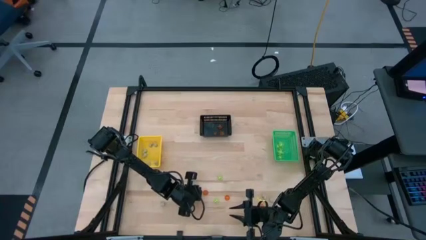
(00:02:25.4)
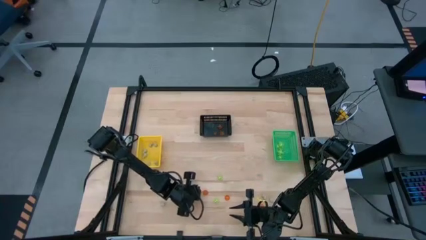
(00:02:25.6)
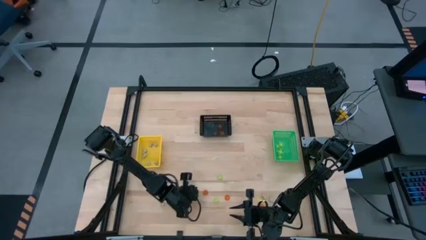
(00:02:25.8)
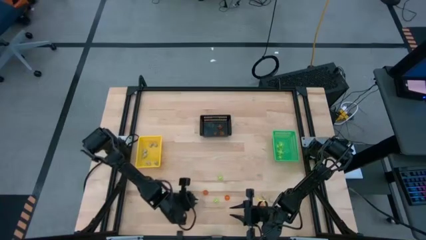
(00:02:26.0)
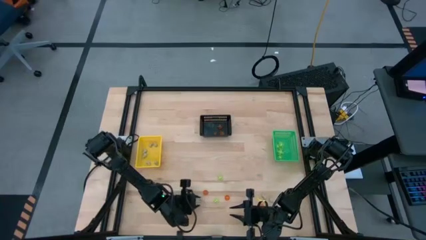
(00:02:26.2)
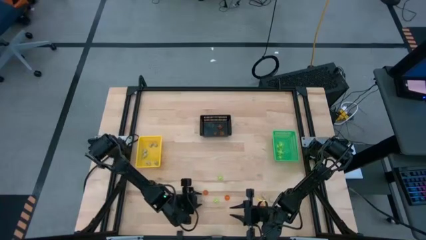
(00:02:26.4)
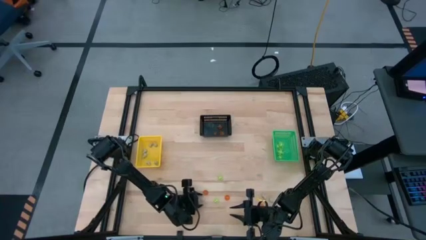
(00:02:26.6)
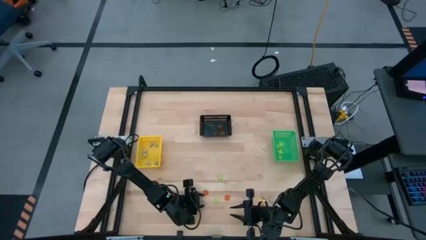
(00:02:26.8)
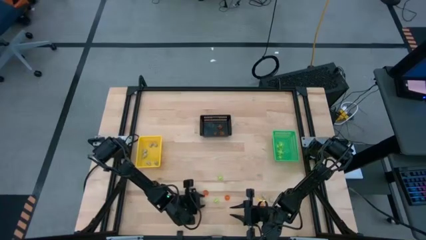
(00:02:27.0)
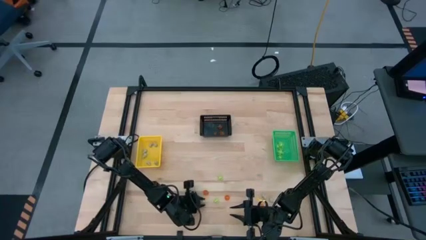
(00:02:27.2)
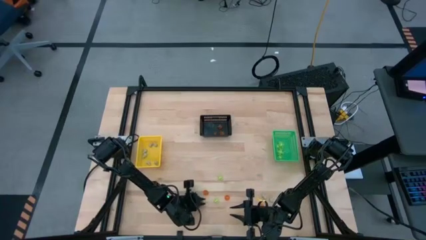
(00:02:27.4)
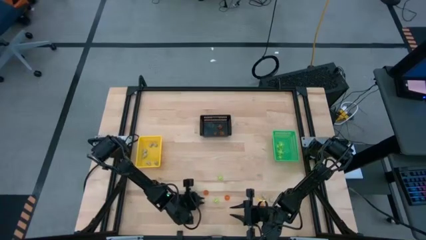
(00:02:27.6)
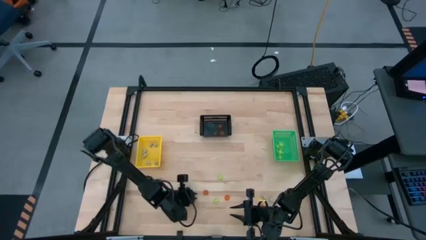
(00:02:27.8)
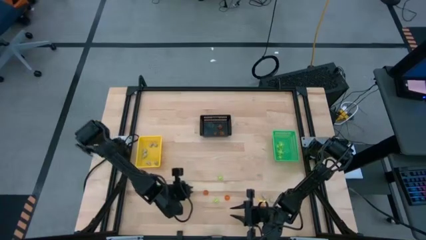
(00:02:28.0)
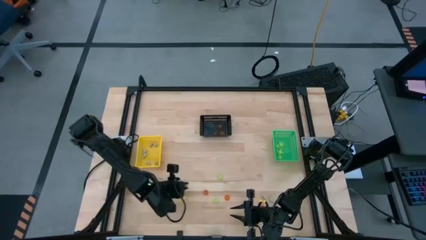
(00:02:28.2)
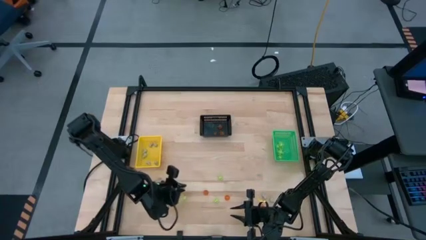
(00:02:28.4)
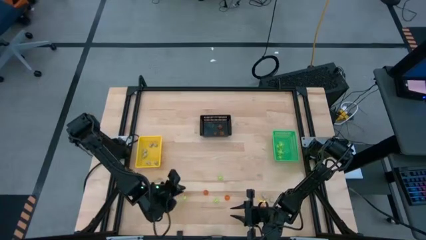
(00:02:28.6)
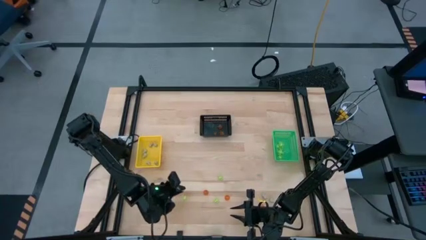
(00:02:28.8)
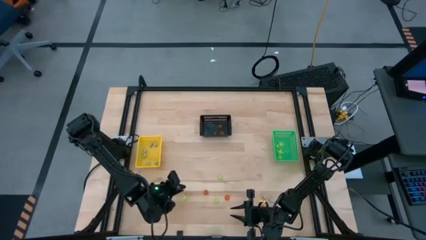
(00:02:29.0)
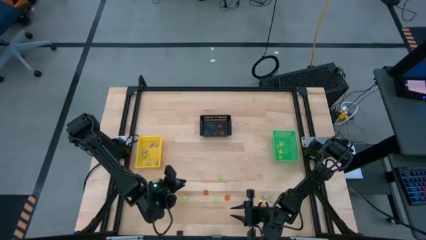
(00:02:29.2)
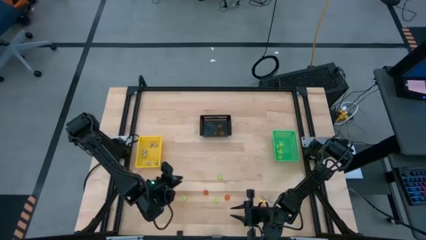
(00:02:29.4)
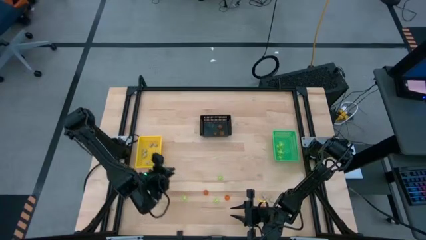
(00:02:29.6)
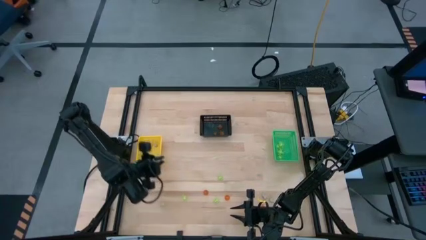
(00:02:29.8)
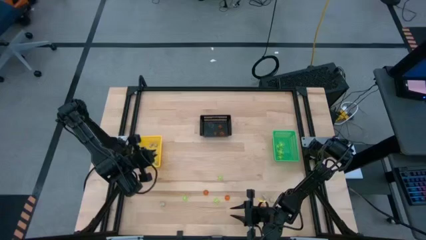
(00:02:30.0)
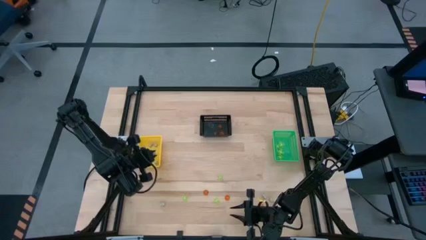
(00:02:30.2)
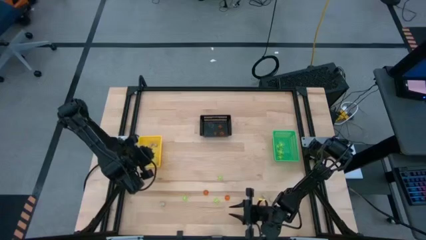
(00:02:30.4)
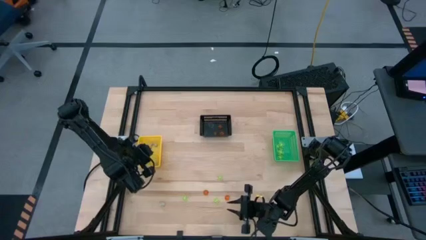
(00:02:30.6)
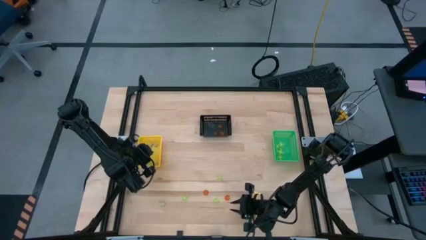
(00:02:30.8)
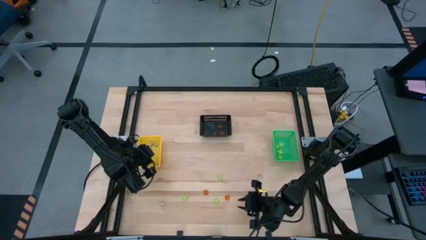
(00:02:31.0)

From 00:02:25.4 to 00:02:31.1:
Task: Sort Halloween decoration
Put the white skull toy into the yellow bin

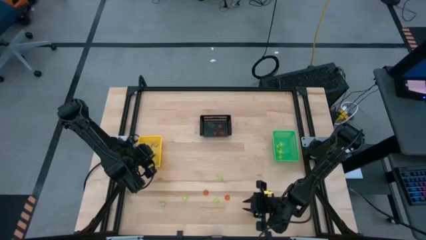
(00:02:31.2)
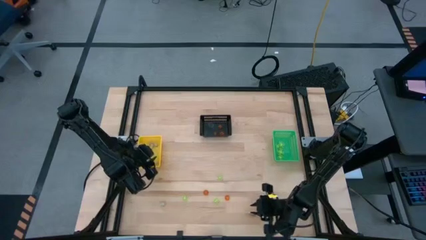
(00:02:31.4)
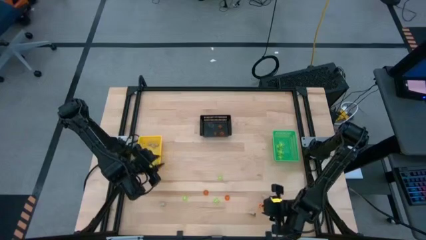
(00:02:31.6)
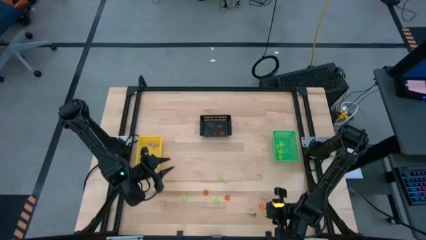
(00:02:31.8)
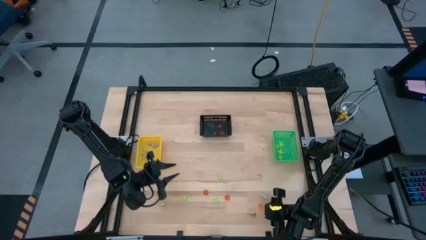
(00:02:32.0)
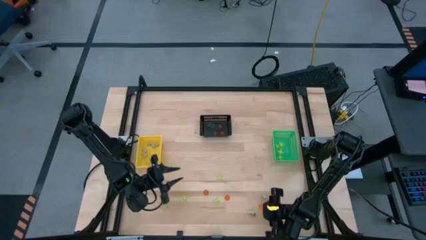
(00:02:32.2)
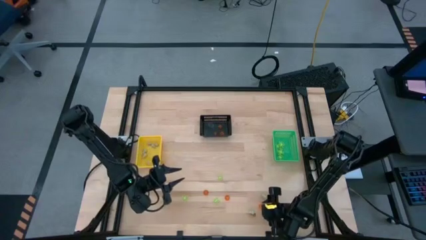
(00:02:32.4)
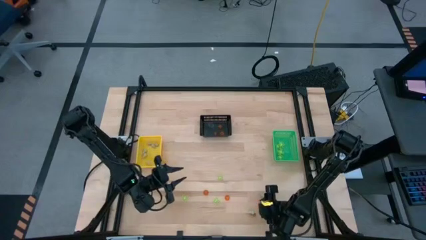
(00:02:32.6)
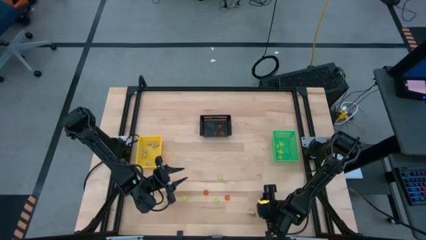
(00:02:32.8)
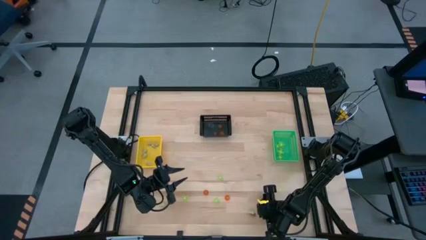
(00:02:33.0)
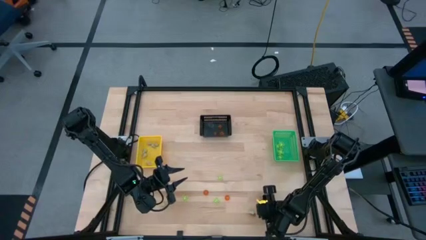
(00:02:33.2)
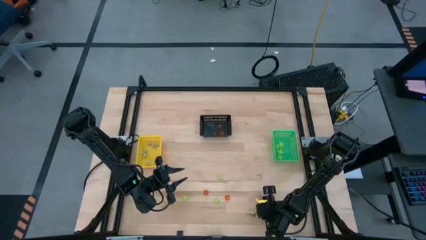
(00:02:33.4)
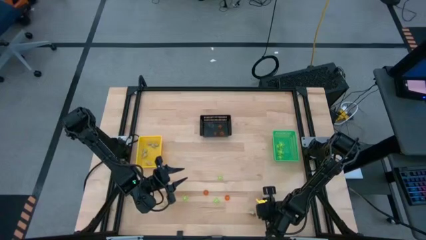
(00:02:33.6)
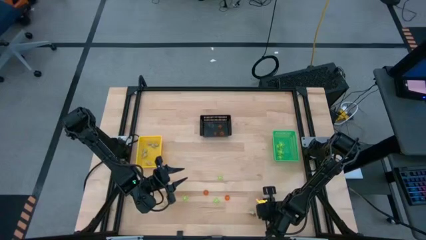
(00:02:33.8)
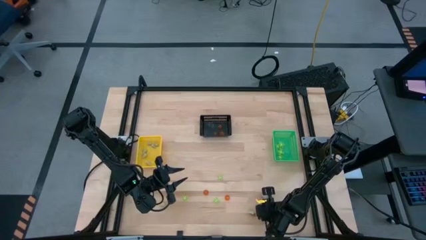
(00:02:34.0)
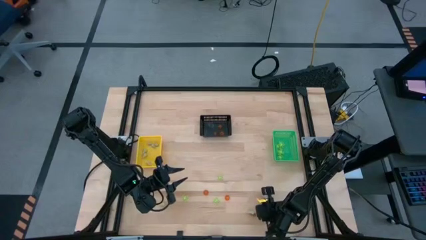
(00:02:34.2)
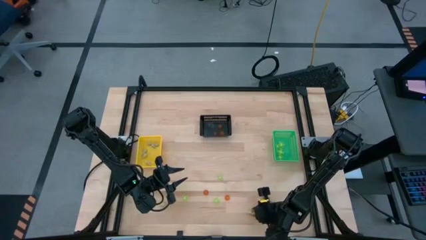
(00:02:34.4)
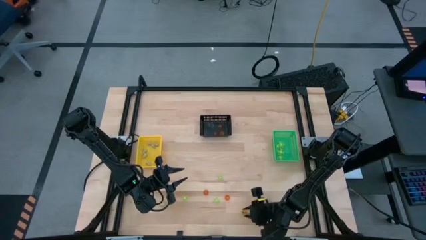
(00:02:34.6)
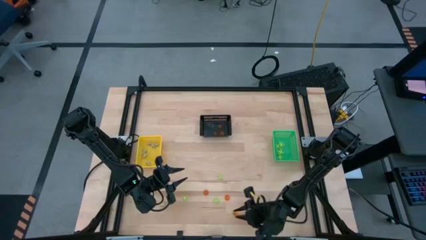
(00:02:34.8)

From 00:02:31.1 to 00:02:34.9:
Put the orange pumpkin toy into the black bin

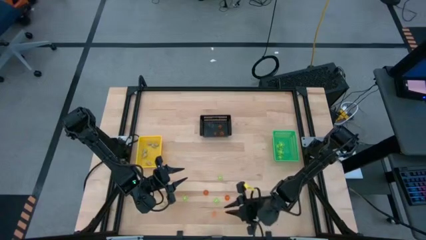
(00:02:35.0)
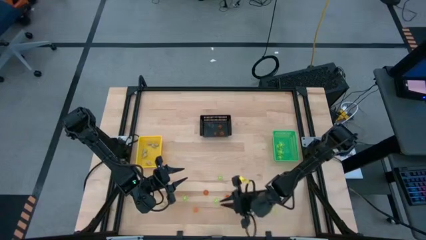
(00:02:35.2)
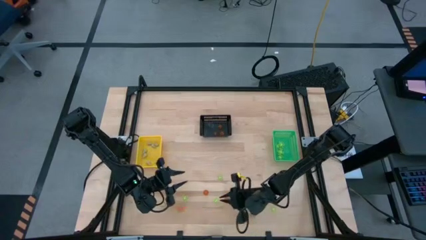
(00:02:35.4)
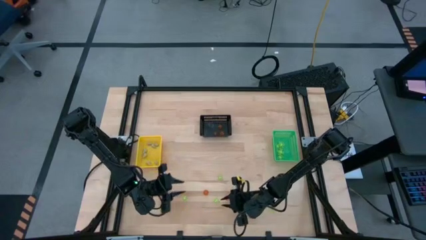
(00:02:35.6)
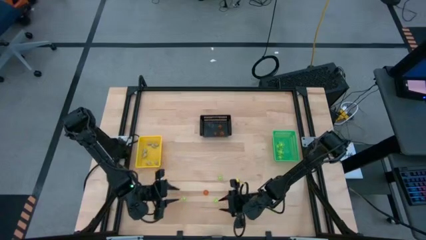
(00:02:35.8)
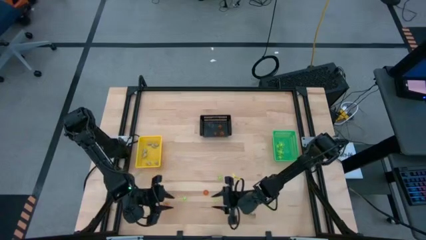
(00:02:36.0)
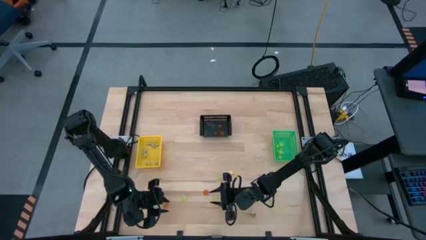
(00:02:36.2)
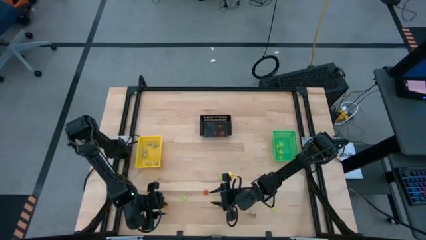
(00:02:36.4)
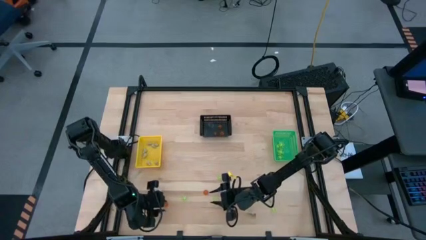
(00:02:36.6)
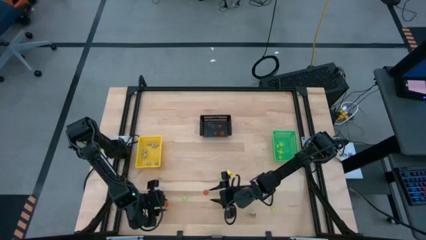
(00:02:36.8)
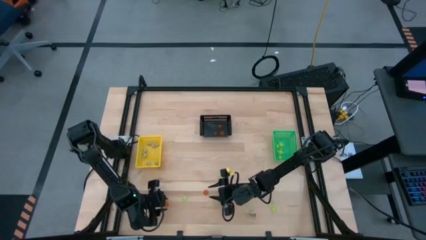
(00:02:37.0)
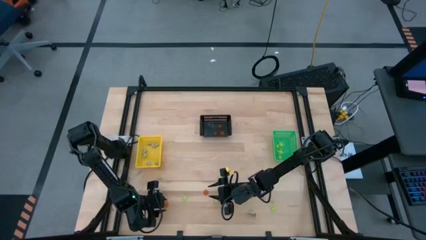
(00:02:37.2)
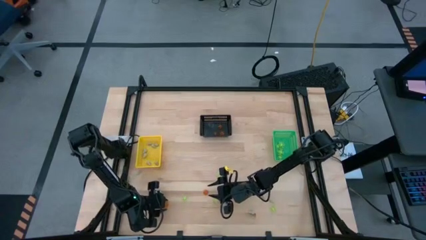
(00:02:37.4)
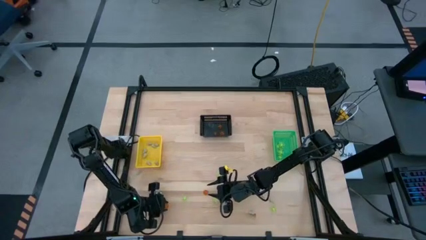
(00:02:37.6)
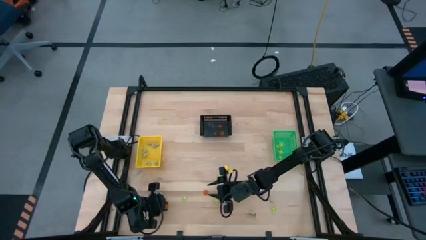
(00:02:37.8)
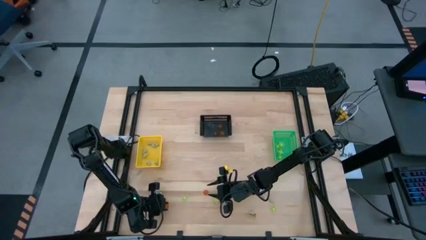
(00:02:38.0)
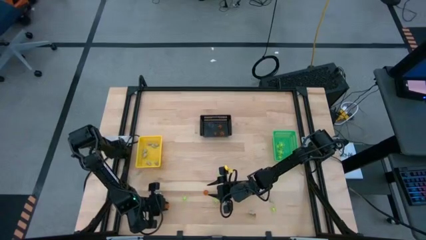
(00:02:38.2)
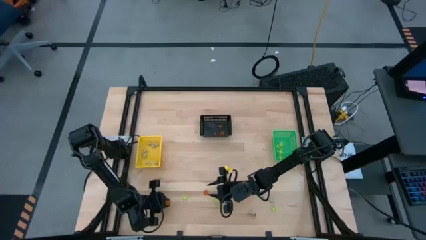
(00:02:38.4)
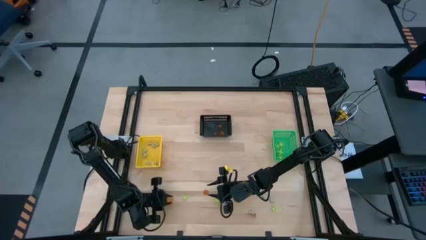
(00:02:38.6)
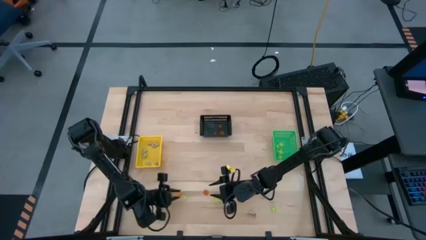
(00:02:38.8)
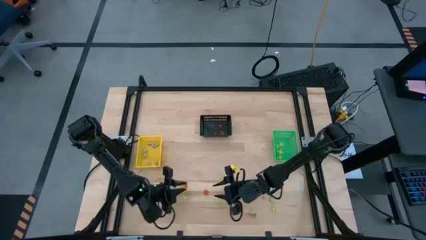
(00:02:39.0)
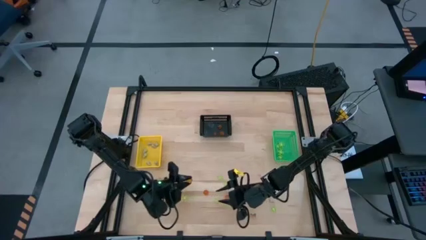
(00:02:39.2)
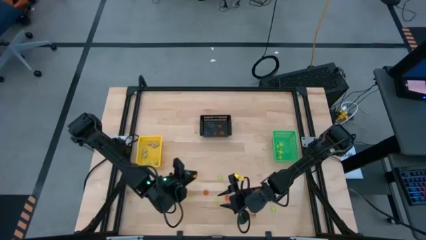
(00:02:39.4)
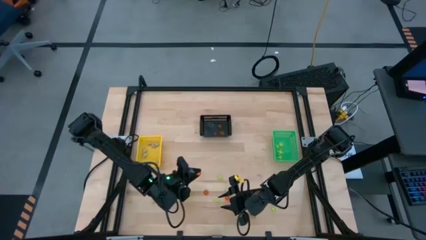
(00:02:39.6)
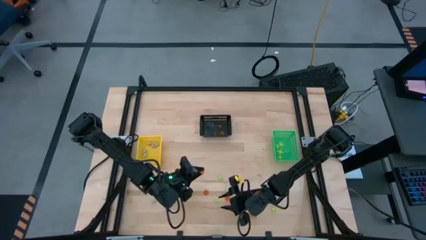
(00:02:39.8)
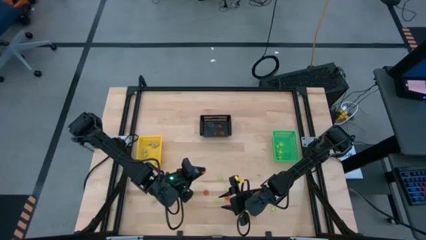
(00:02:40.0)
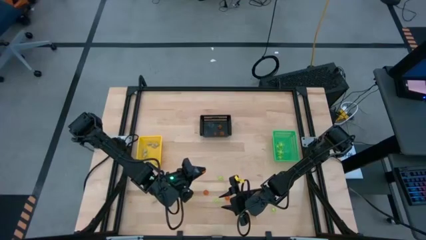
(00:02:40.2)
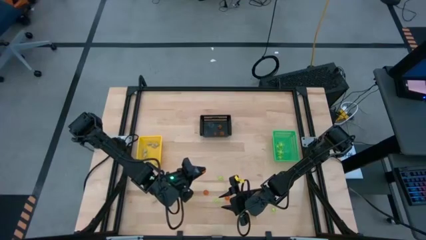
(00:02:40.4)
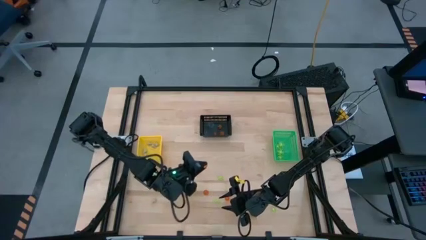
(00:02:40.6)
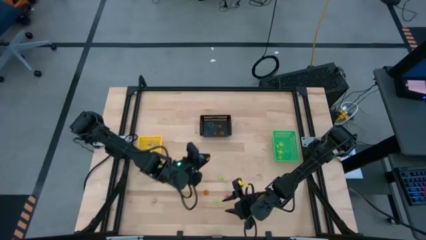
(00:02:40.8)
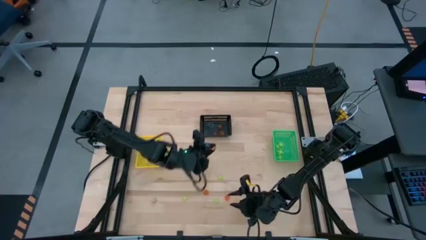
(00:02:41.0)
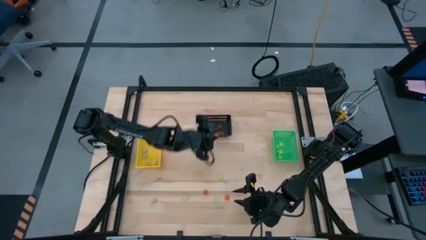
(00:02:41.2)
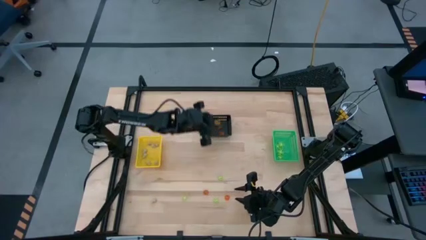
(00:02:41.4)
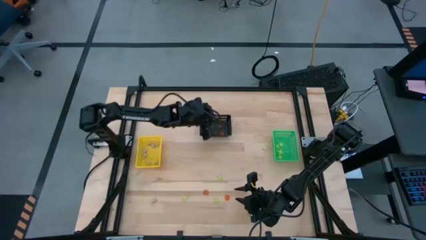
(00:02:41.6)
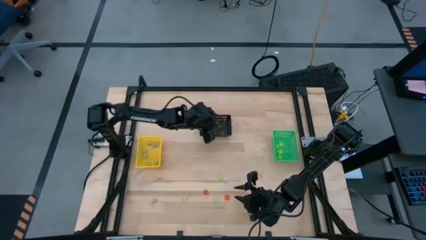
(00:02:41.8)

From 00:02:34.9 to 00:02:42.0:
Put the orange pumpkin toy into the black bin
